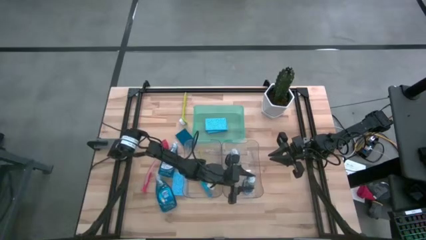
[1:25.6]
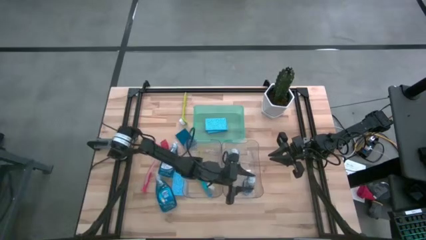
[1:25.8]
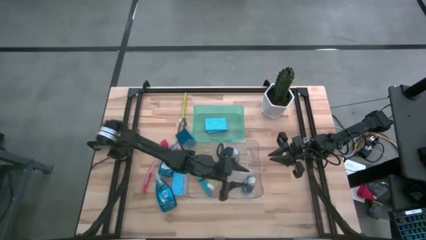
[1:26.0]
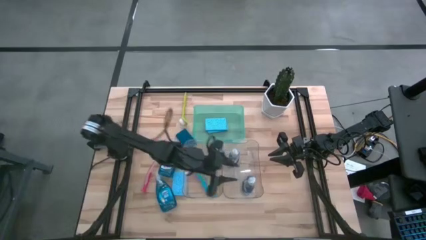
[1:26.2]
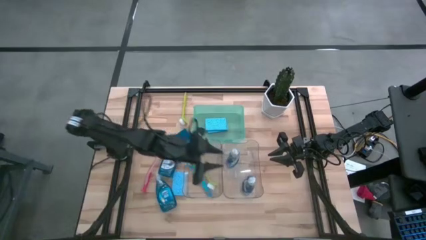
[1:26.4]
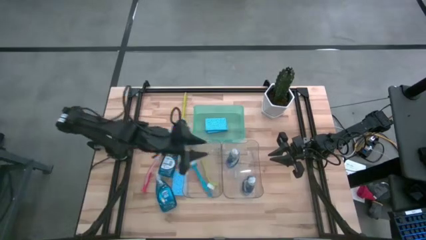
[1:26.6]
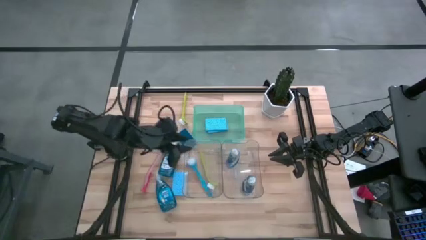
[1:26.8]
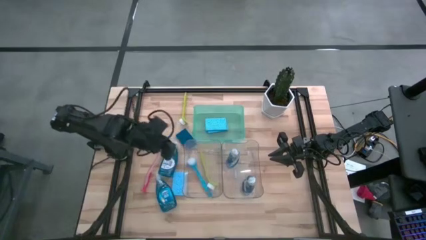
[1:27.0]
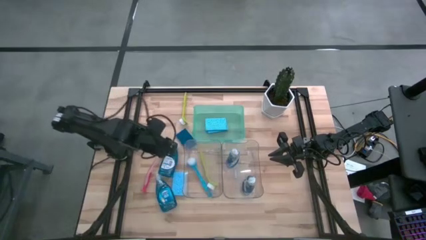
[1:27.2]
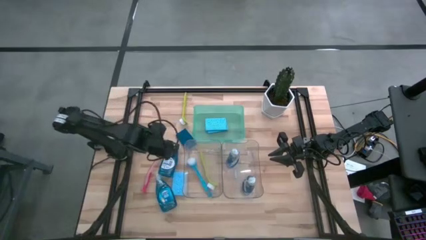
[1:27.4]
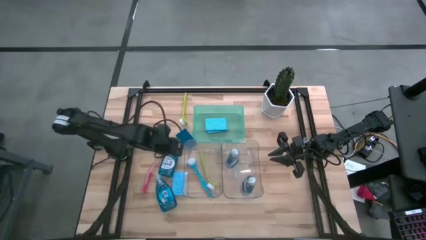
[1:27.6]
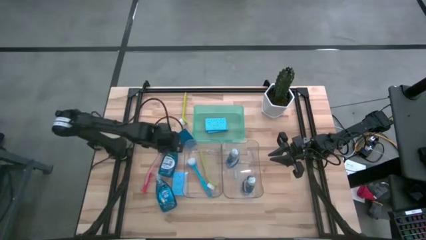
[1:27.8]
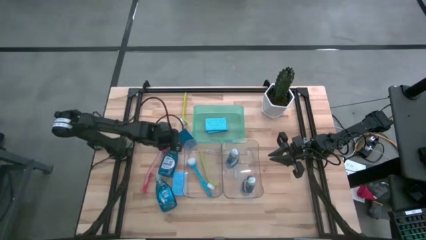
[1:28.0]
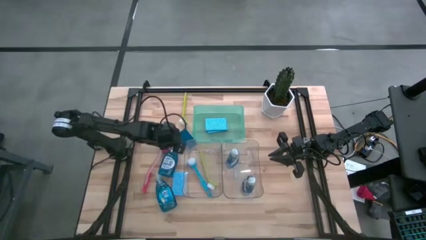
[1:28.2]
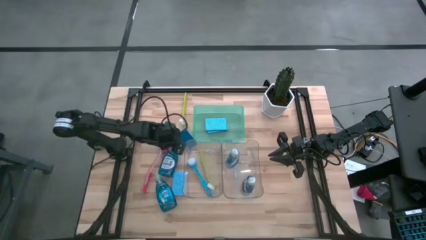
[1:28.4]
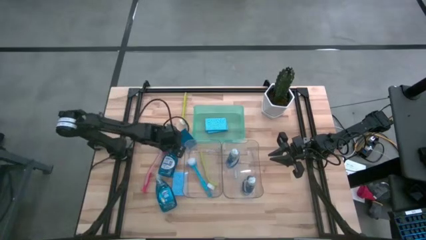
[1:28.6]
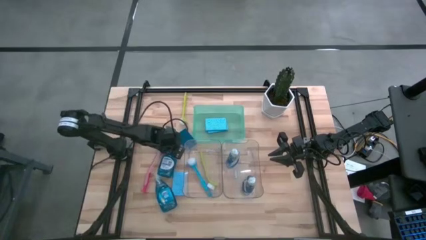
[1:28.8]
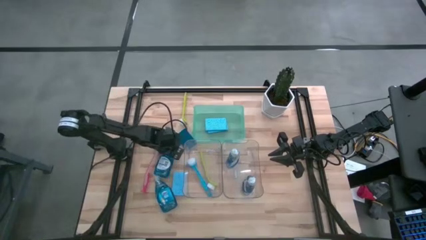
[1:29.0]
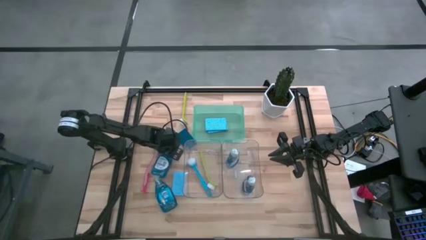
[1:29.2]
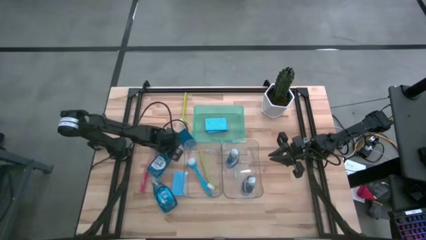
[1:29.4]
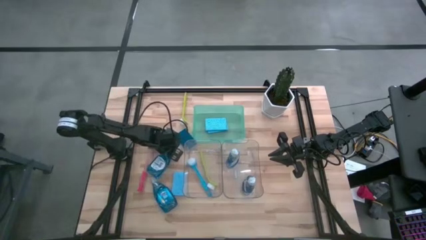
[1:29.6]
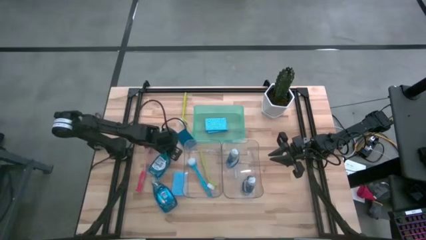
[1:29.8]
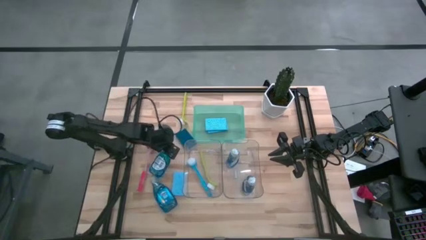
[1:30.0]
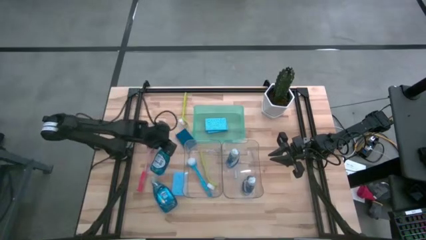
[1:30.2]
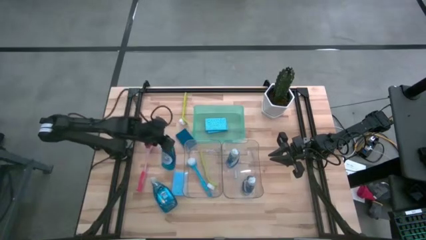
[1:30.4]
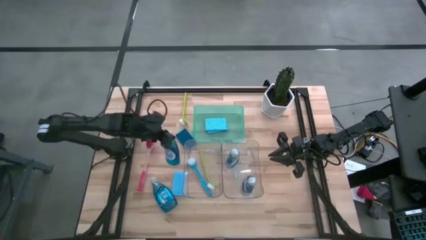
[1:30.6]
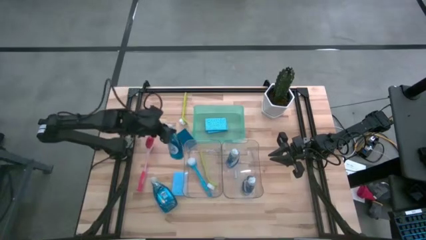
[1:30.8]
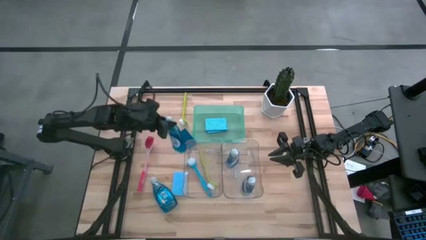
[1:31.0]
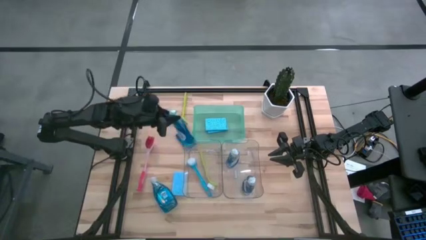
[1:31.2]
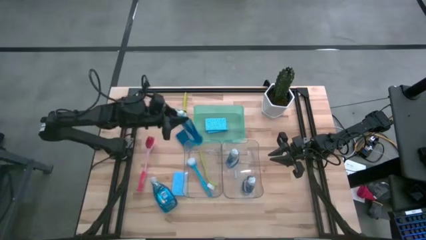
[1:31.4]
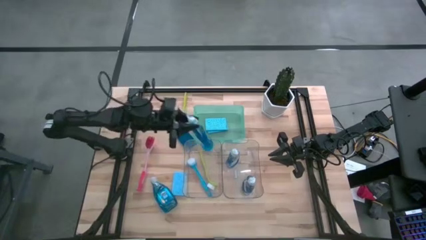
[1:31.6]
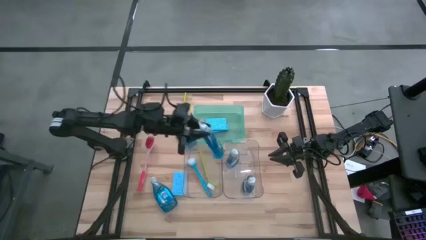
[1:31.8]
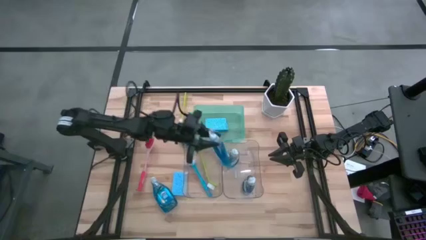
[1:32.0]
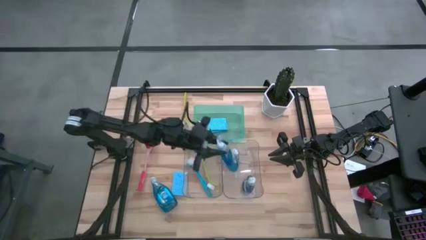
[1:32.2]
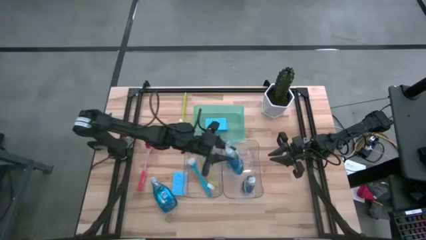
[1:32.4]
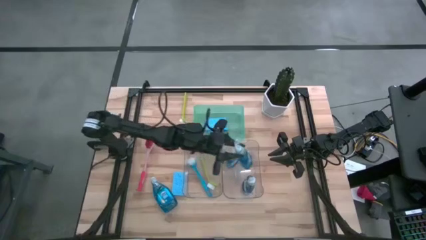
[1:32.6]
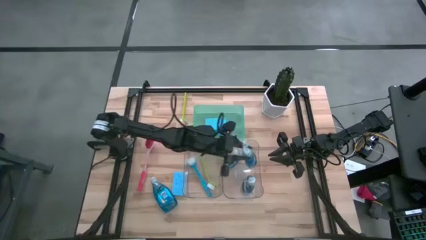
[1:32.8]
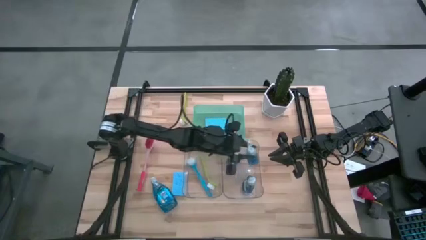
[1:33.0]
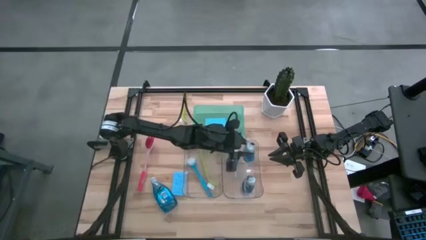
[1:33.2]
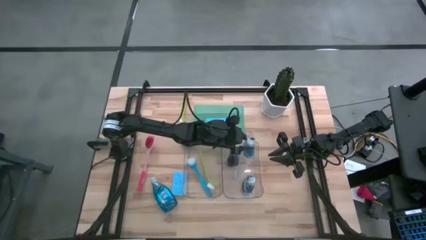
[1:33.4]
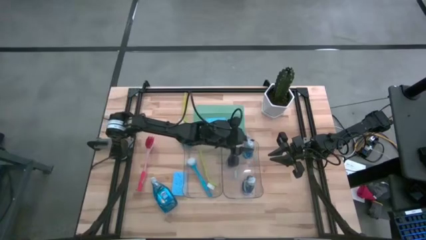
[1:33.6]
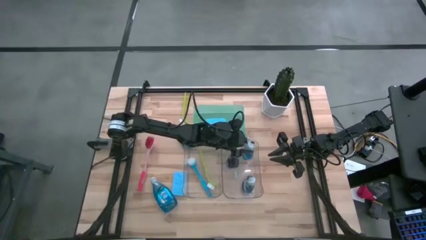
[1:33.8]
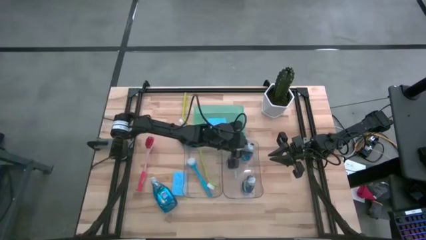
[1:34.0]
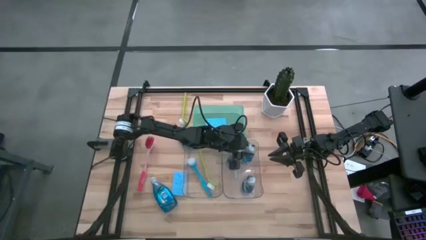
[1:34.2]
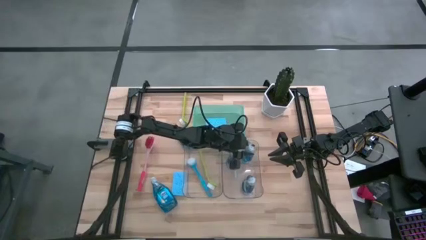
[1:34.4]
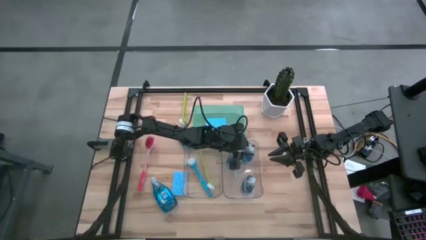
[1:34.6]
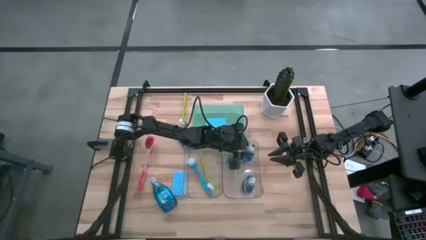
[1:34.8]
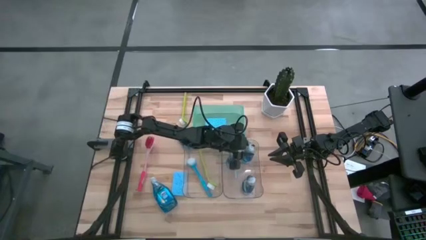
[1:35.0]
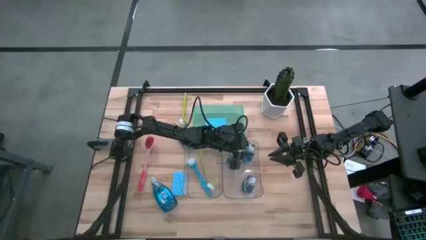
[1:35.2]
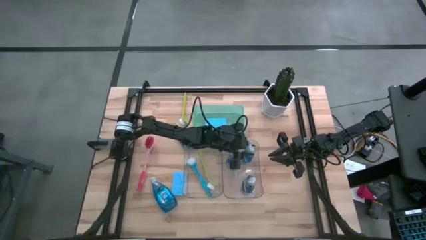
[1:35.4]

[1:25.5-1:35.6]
Task: Pick & Place Kitchen Sink Supplies
Put the blue dishwashing liquid bottle into the right transparent bin

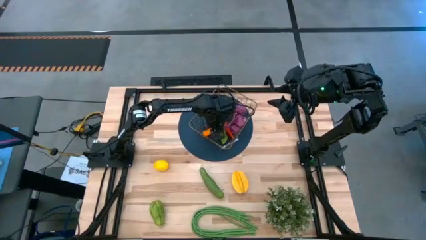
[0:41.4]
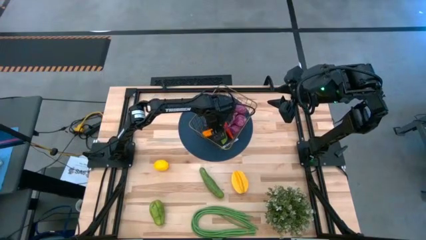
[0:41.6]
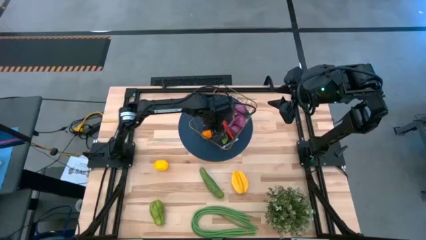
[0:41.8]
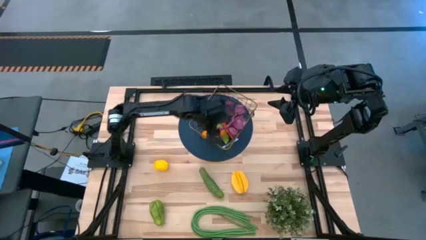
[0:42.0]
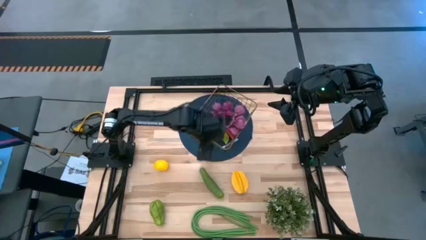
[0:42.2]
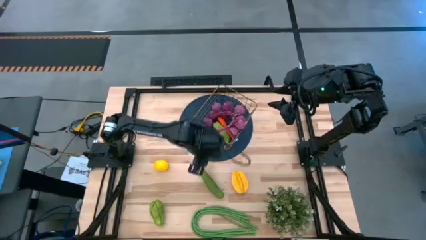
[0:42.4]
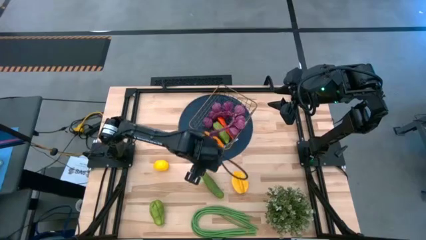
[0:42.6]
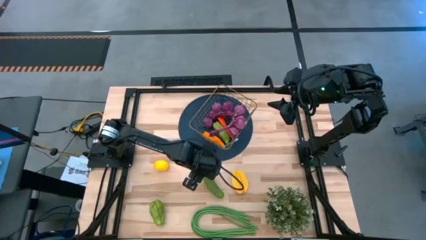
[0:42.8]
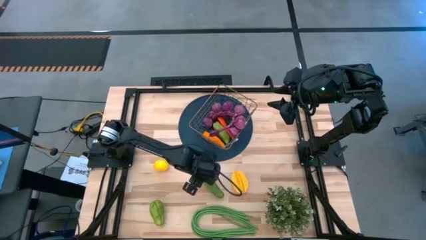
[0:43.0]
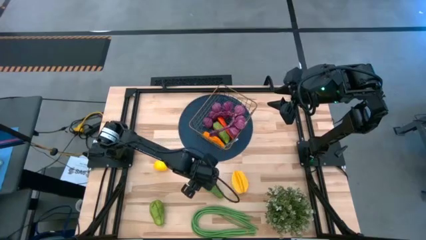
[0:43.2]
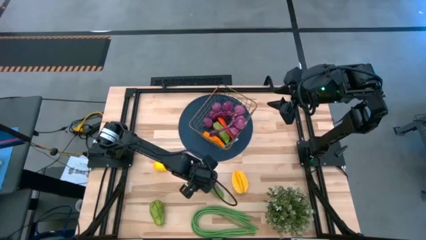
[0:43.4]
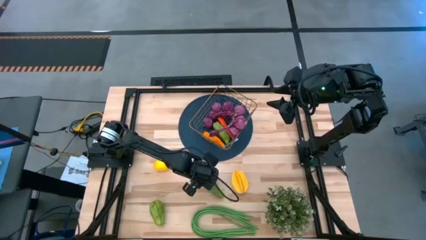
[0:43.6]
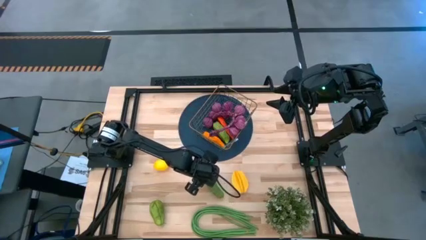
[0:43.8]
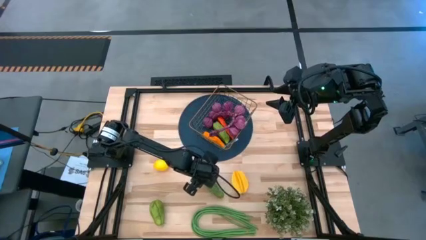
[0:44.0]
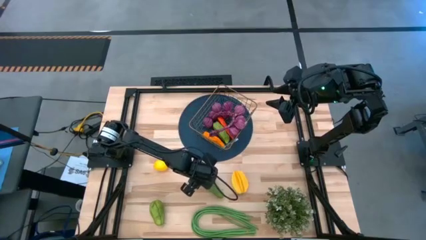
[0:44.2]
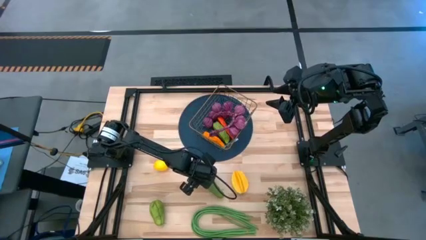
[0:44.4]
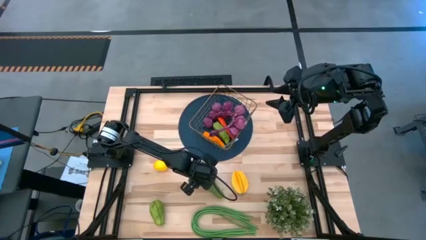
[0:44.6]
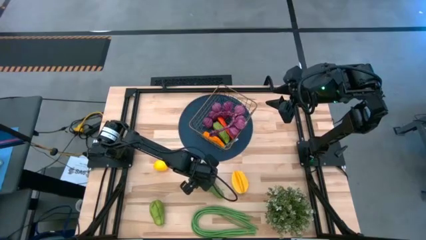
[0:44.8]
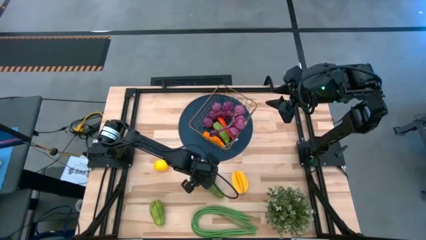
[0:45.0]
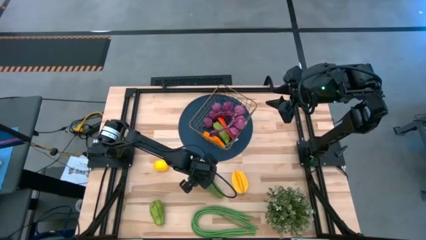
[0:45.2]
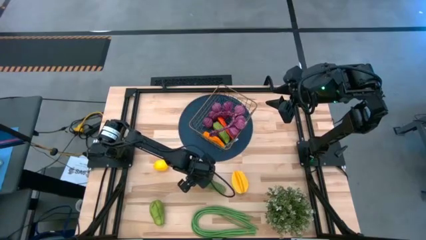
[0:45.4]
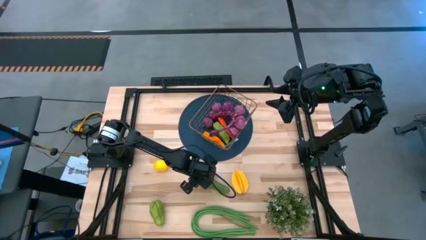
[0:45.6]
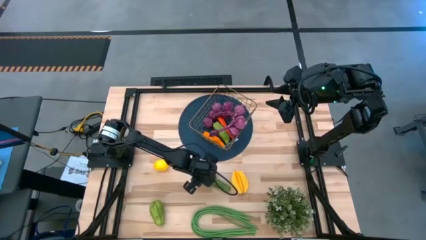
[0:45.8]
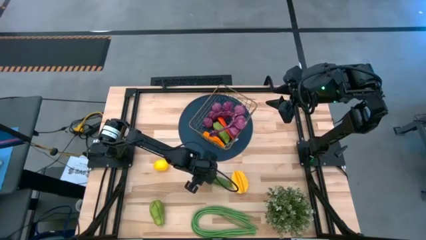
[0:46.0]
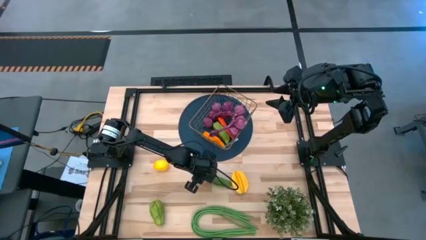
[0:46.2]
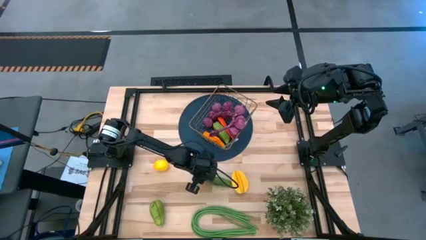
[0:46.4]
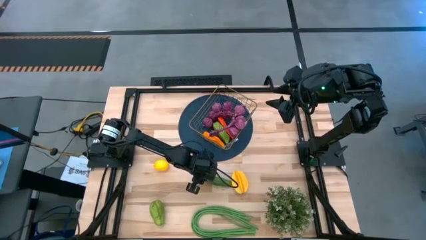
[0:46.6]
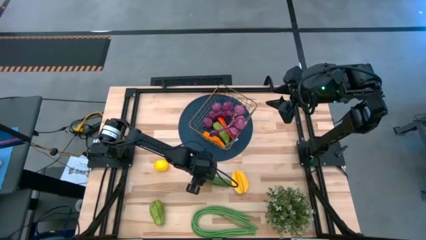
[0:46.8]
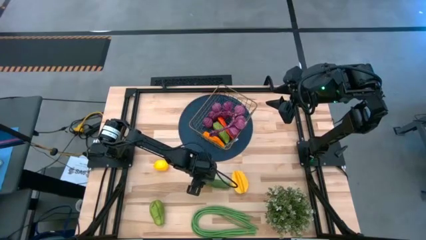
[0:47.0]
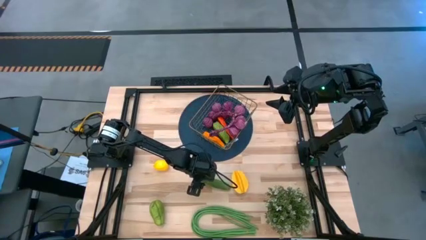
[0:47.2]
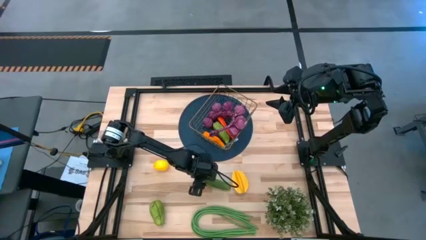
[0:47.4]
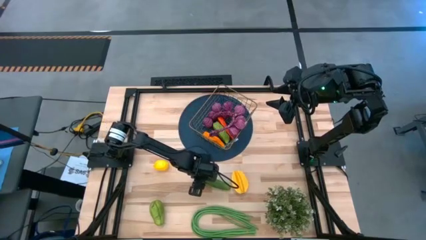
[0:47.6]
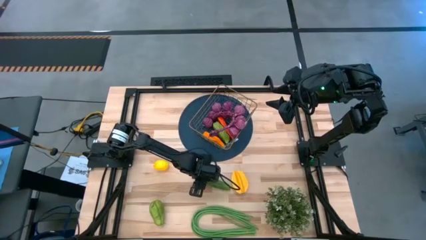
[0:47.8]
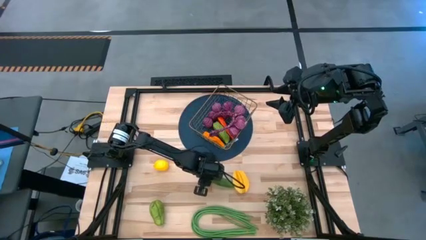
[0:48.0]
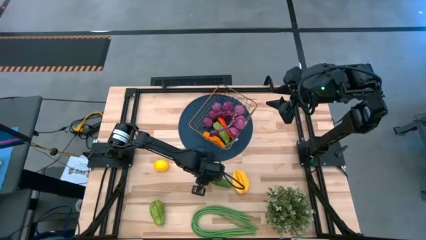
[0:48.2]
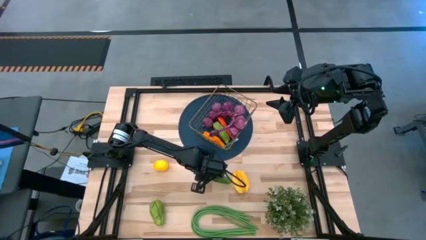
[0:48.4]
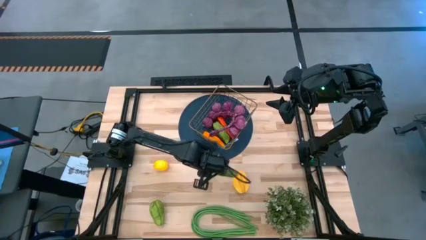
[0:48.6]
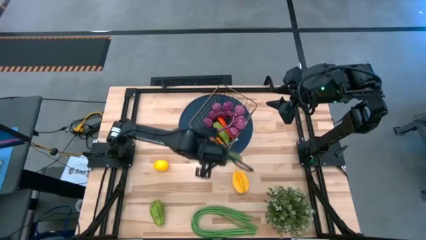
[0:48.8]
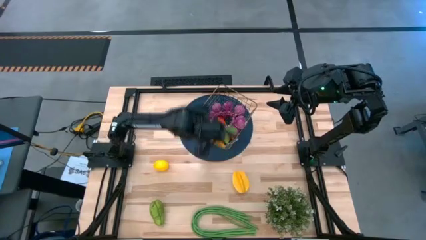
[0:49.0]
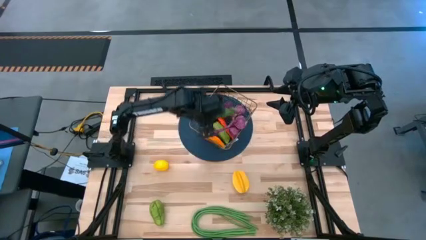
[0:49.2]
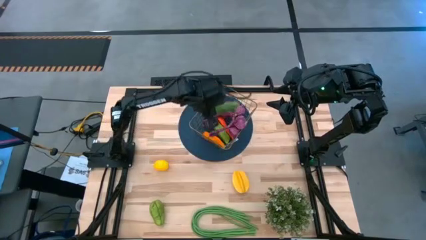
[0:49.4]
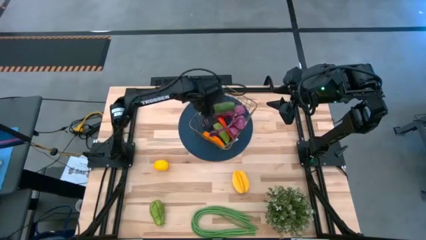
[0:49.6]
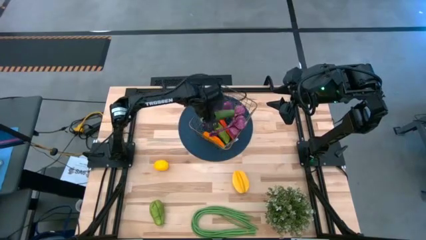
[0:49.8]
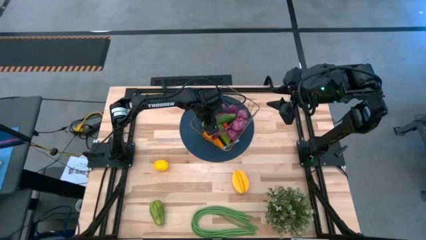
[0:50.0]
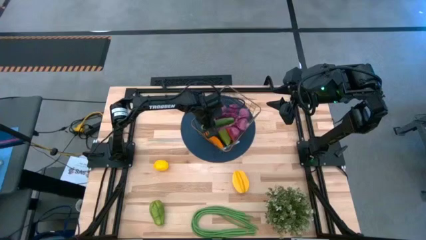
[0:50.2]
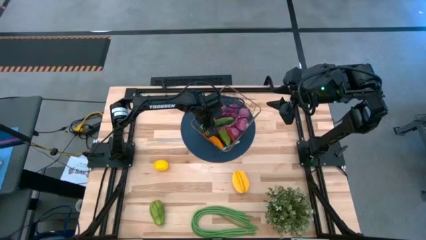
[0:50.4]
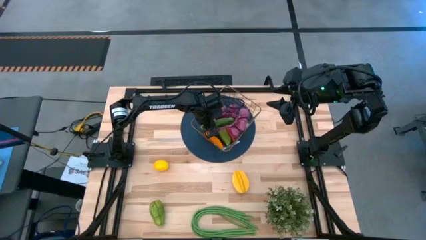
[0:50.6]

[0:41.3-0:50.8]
Task: Build produce basket
Put the middle cucumber into the wire basket
